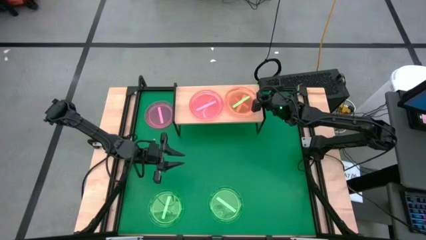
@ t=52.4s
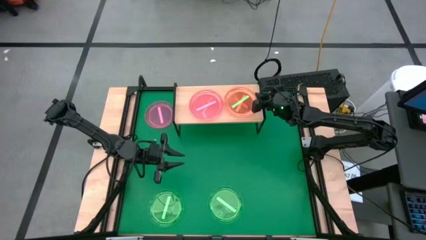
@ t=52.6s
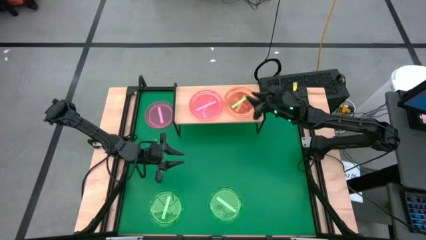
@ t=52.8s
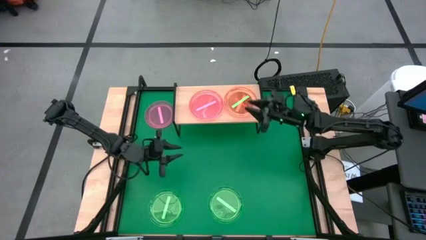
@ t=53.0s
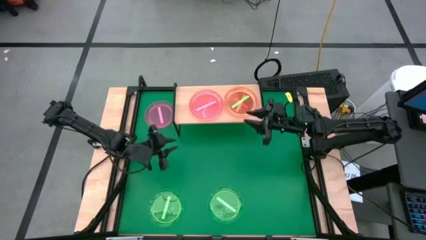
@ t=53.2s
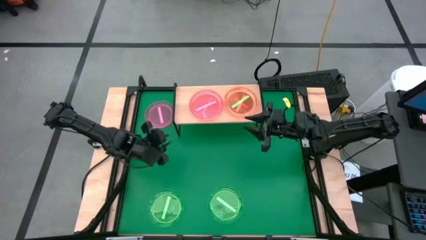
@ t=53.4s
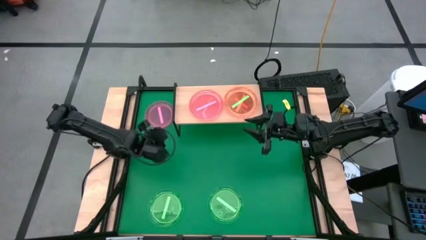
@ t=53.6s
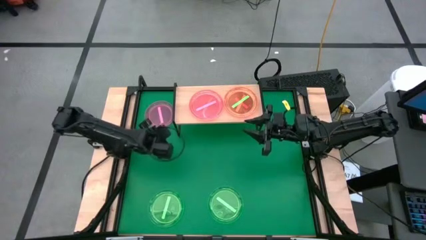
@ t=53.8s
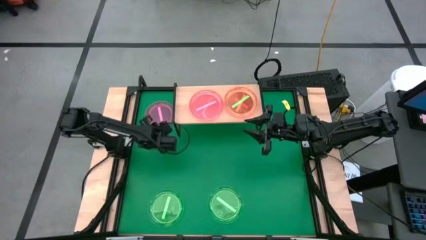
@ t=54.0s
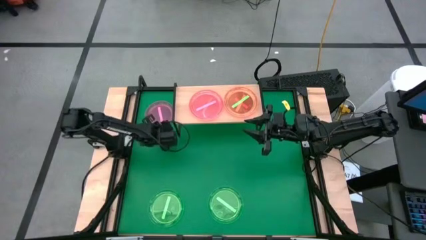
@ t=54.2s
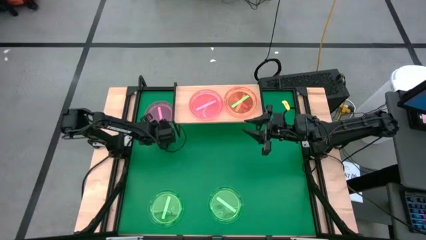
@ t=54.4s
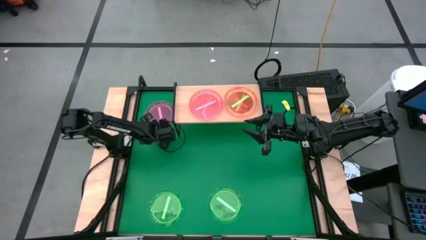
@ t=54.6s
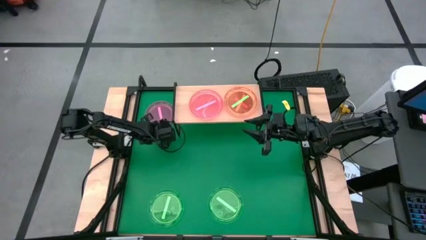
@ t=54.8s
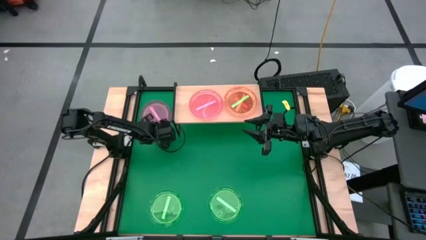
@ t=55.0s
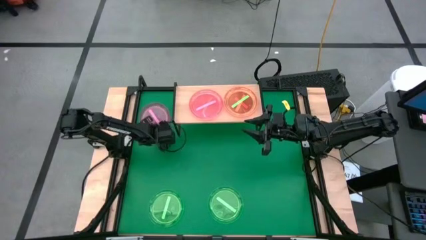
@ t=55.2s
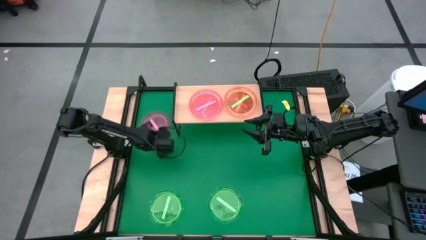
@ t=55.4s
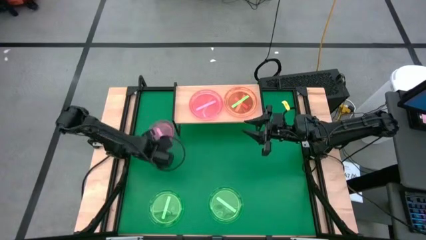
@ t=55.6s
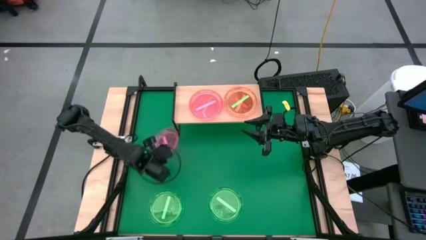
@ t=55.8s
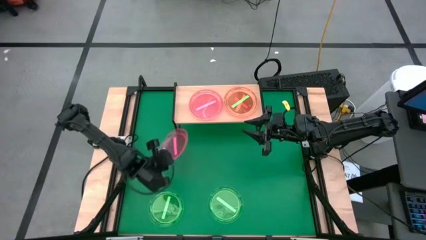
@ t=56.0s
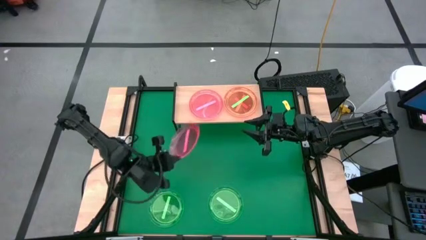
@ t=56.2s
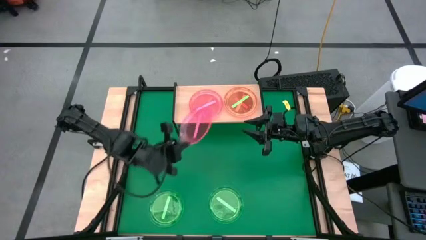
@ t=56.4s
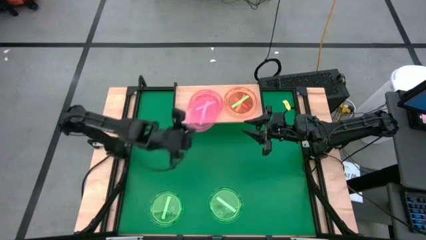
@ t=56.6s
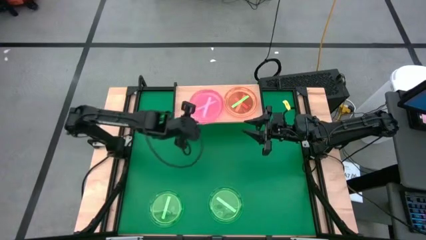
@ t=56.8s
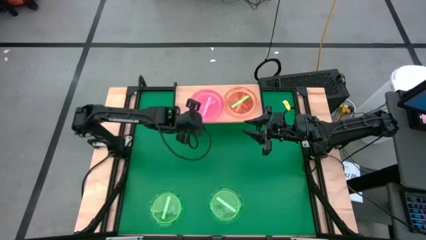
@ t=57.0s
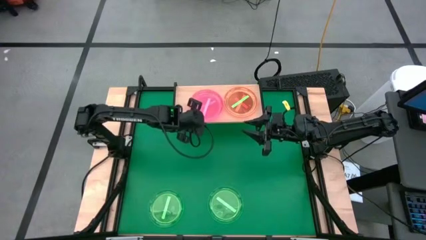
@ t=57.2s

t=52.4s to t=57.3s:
Task: Place and stack plates onto a shelf
Stack the pink transparent plate on top of the pink transparent plate on the shelf

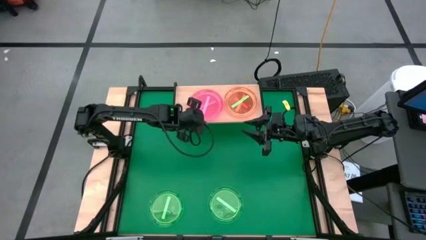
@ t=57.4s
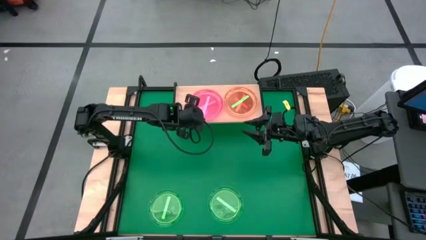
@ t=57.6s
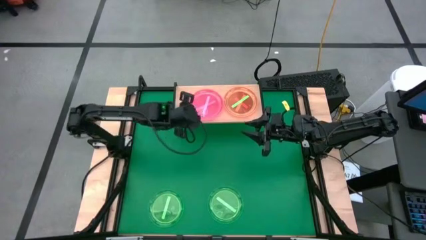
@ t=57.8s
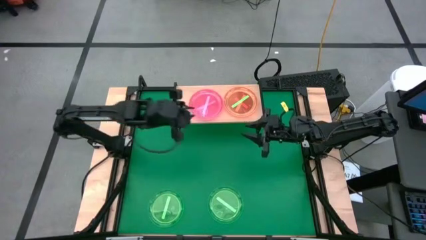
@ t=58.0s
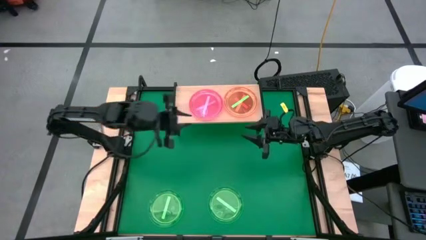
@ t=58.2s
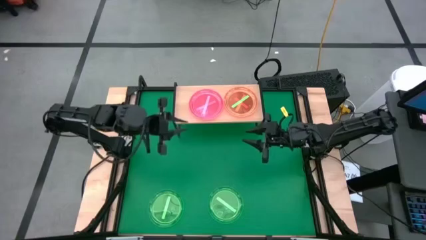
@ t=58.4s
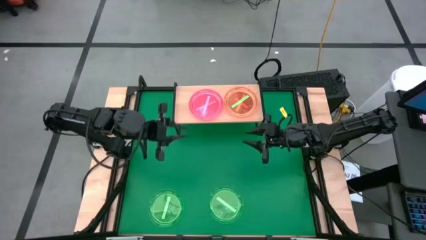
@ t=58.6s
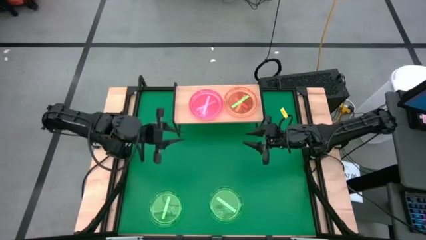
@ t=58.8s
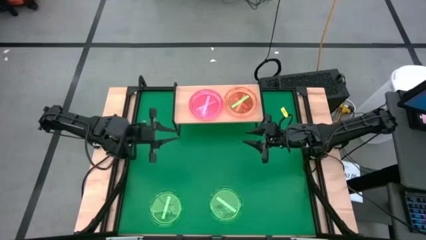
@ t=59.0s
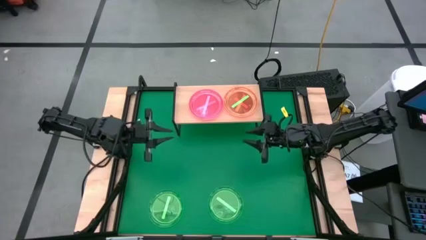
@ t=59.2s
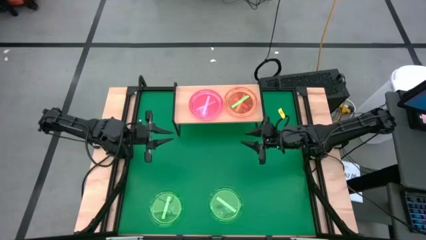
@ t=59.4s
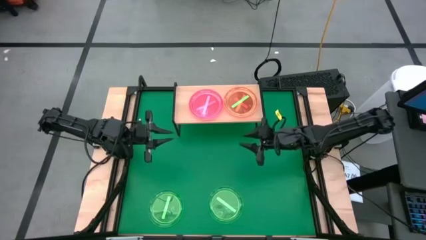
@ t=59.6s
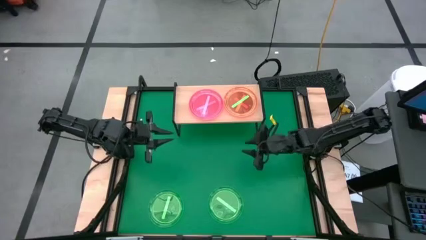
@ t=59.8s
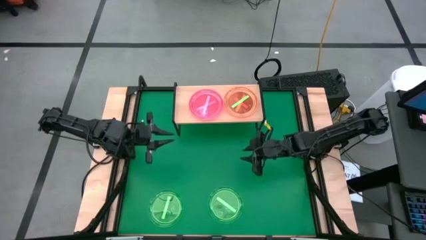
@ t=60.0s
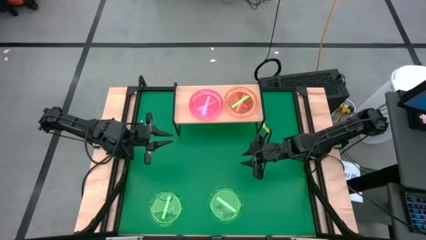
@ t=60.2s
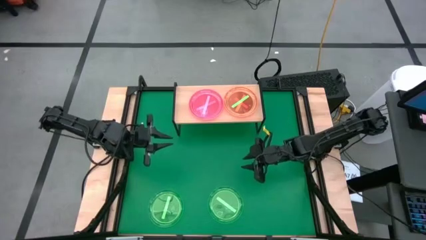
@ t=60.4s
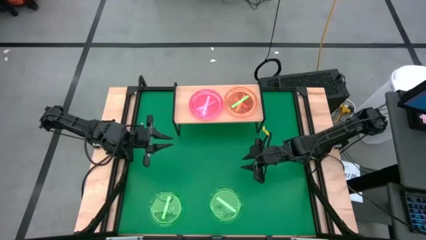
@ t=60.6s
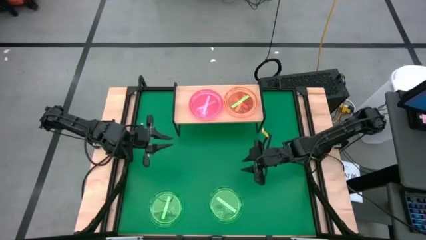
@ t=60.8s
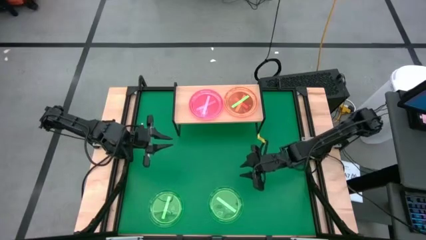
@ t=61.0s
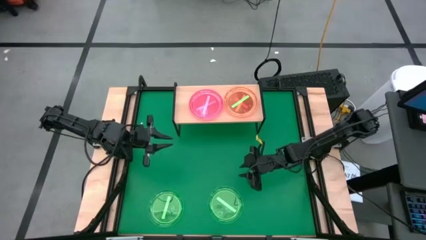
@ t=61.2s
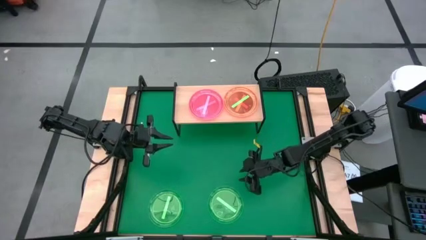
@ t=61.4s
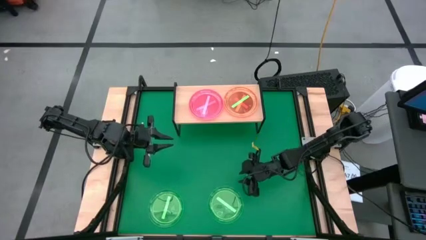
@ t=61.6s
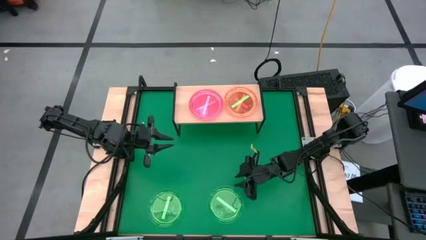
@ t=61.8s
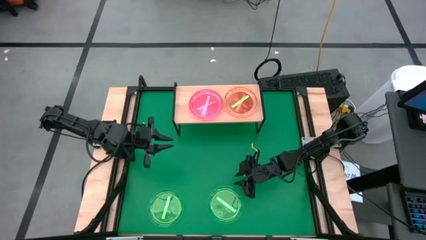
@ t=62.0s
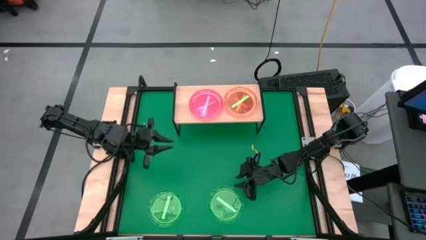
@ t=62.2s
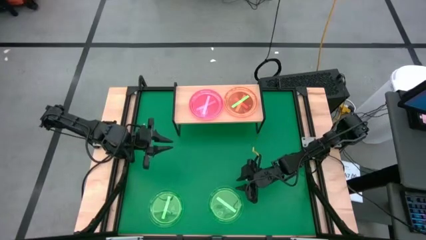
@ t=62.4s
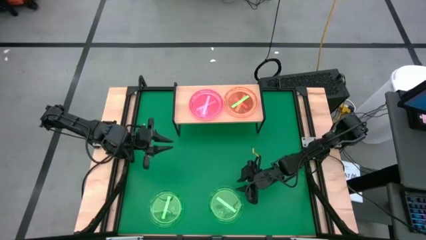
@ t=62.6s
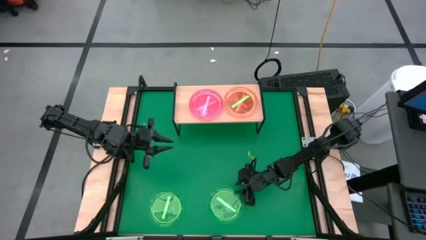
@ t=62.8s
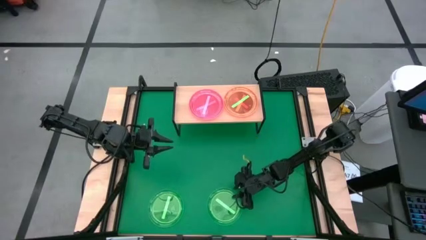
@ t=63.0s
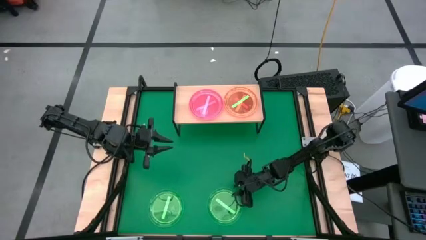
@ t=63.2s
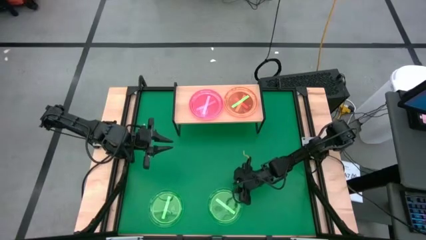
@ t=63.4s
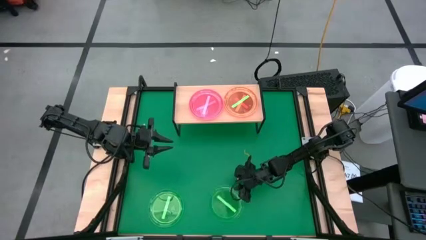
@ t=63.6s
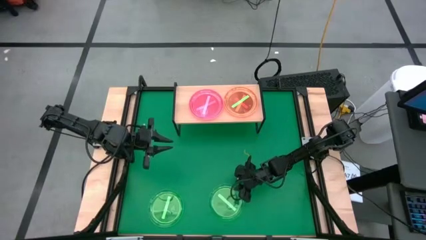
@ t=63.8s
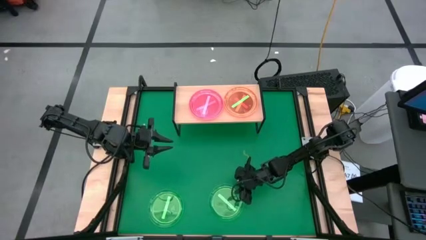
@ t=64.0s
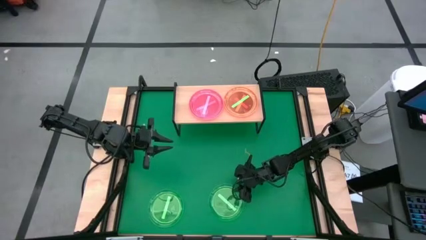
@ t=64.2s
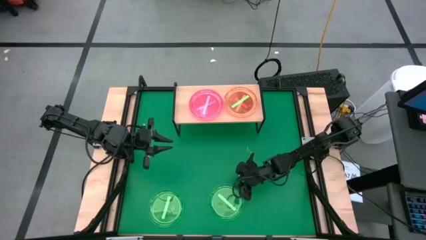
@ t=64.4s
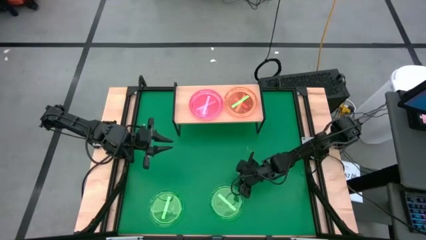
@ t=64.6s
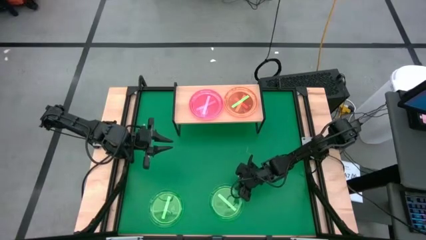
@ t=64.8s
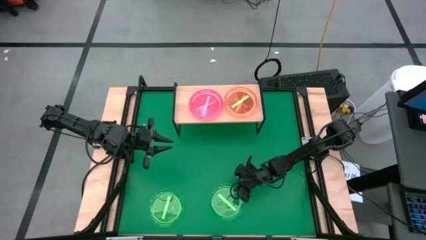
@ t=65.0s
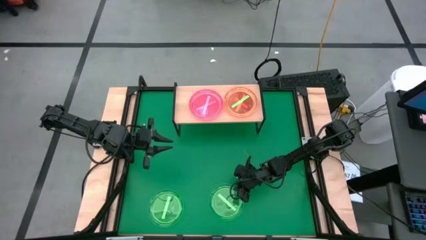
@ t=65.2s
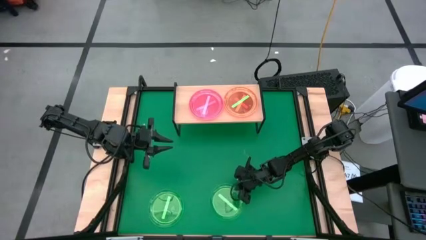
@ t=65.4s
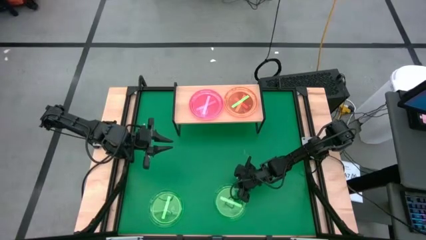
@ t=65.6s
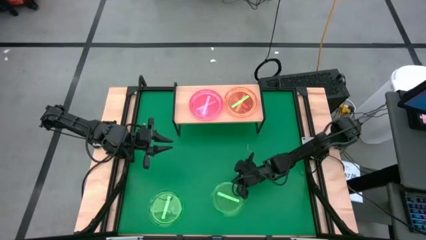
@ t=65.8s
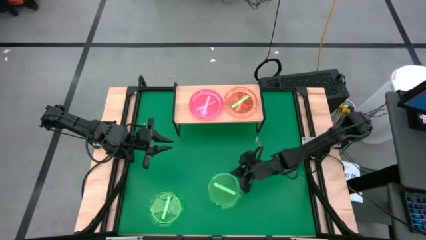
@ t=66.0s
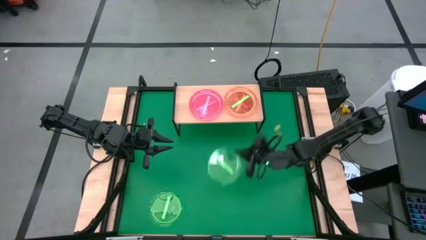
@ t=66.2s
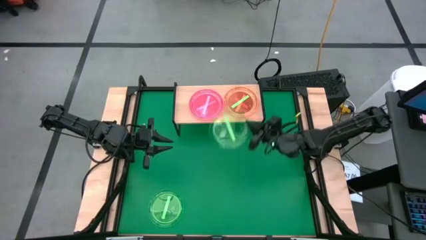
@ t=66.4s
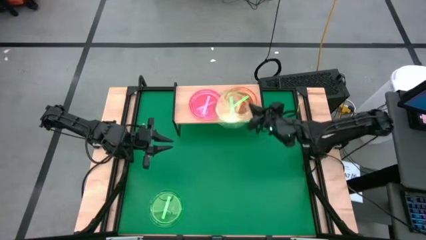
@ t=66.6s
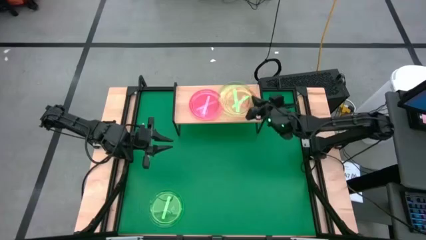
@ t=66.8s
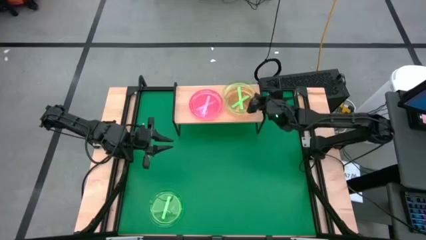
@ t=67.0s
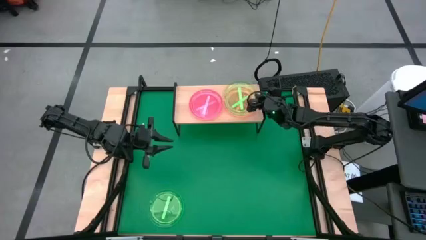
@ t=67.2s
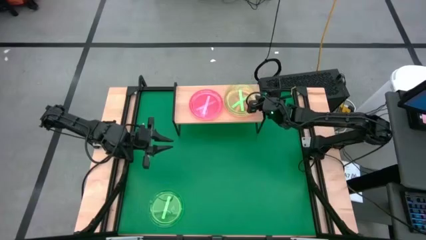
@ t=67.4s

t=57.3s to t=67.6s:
Stack the right green transparent plate on top of the green transparent plate on the shelf
